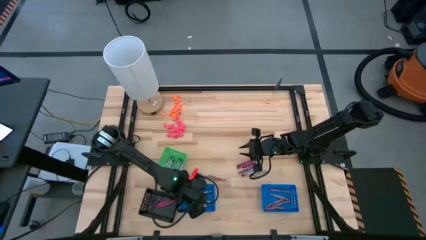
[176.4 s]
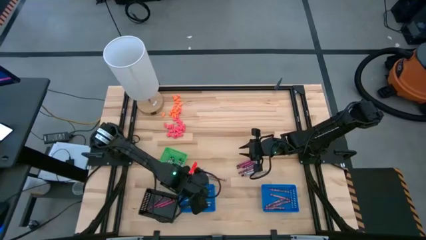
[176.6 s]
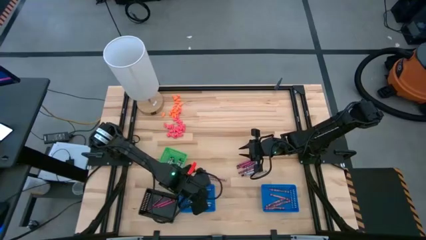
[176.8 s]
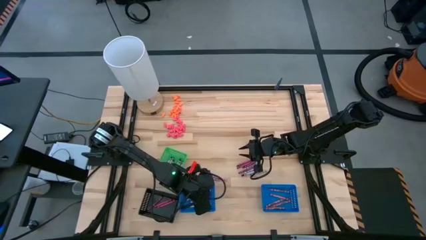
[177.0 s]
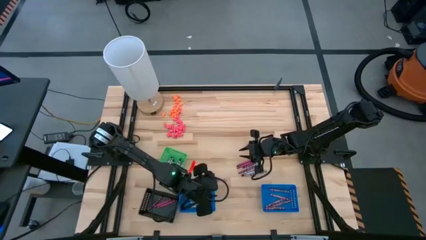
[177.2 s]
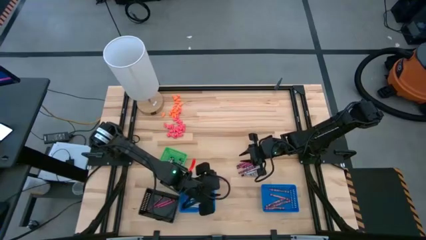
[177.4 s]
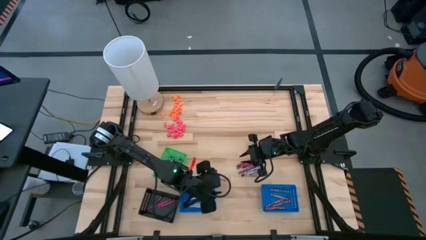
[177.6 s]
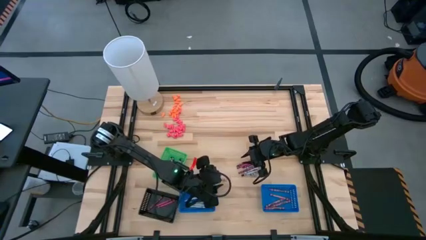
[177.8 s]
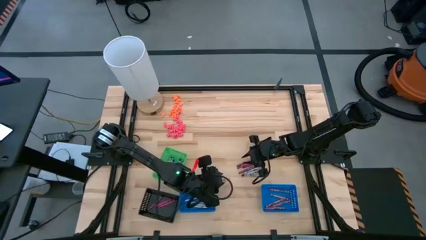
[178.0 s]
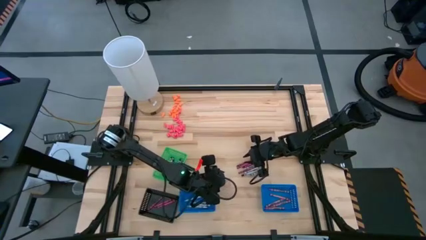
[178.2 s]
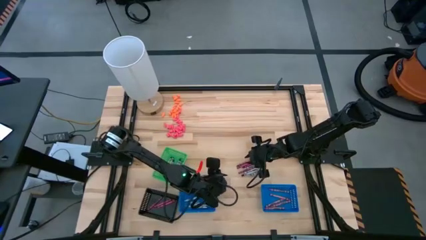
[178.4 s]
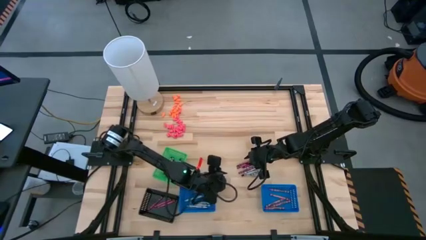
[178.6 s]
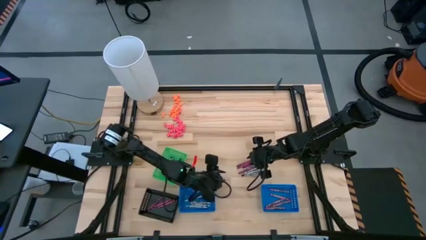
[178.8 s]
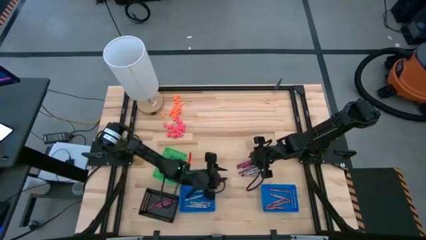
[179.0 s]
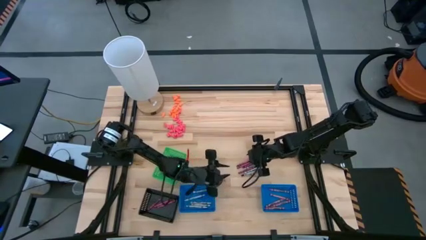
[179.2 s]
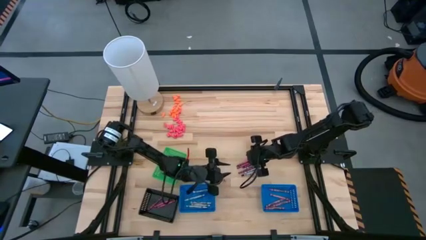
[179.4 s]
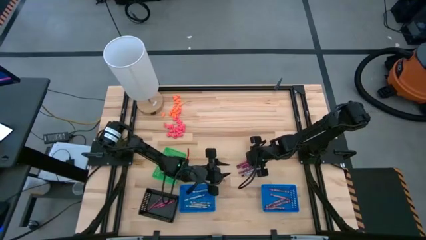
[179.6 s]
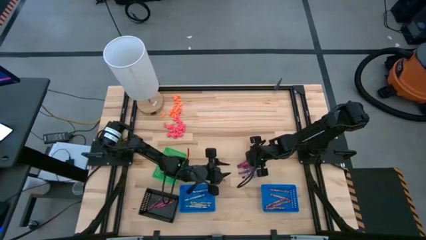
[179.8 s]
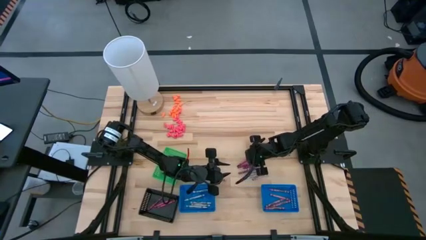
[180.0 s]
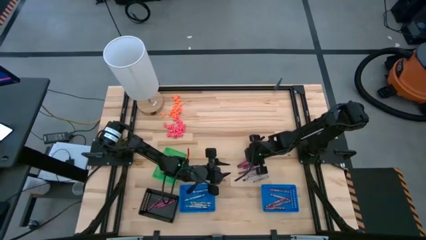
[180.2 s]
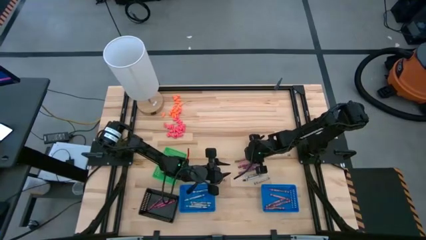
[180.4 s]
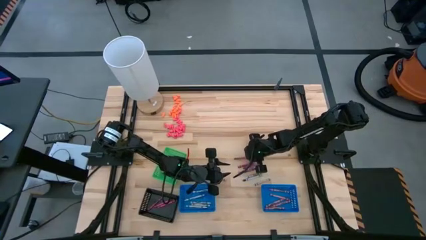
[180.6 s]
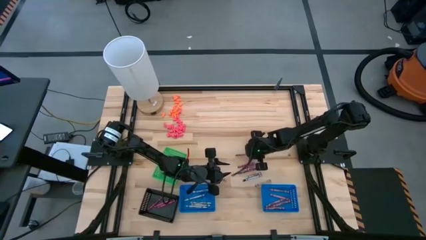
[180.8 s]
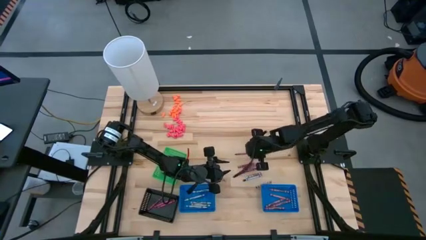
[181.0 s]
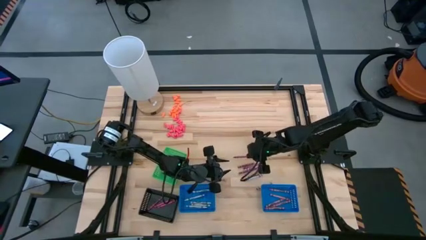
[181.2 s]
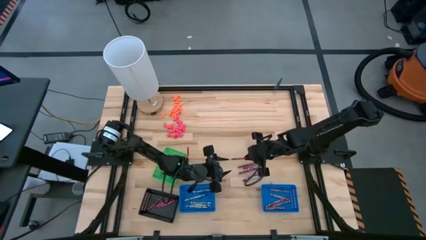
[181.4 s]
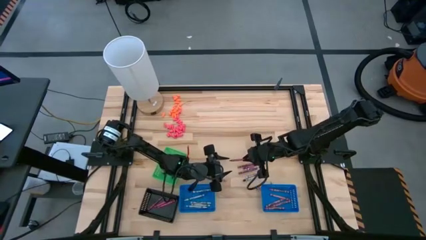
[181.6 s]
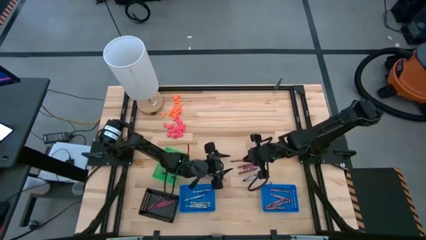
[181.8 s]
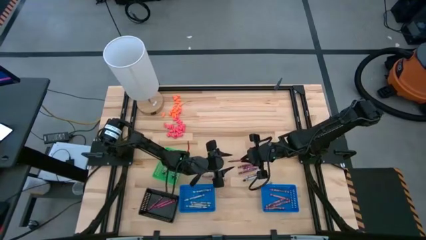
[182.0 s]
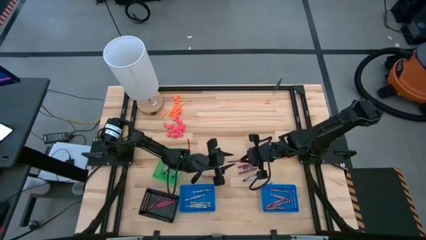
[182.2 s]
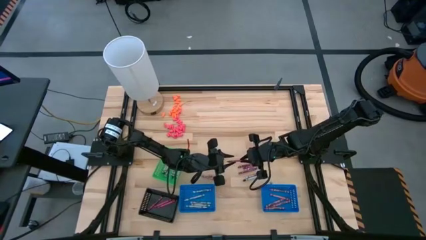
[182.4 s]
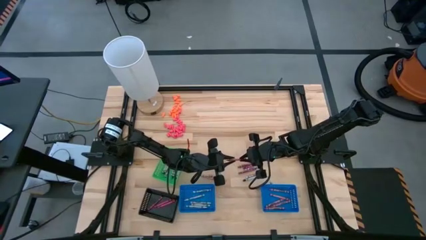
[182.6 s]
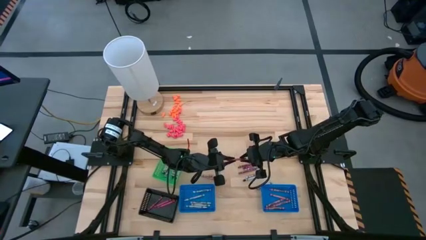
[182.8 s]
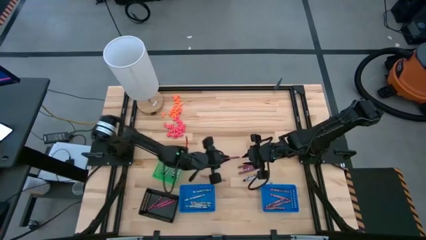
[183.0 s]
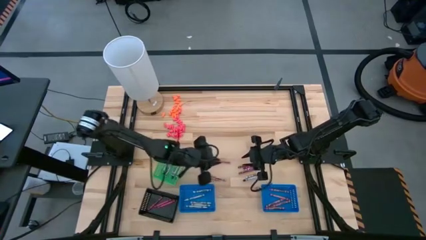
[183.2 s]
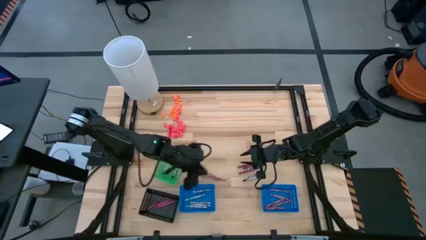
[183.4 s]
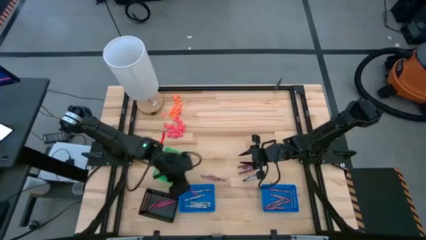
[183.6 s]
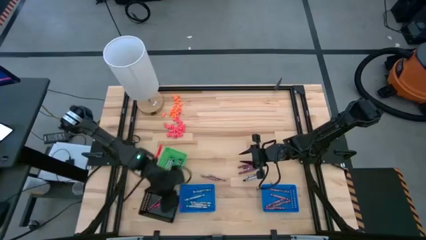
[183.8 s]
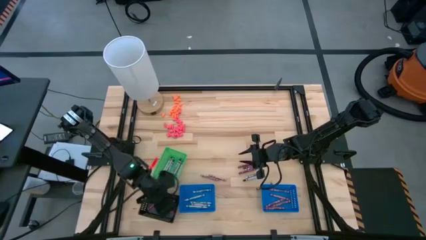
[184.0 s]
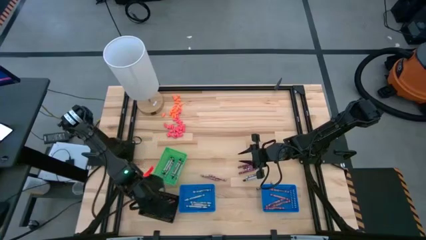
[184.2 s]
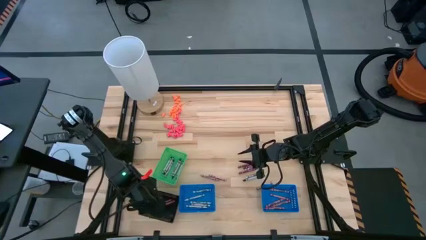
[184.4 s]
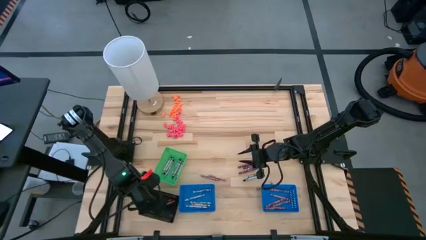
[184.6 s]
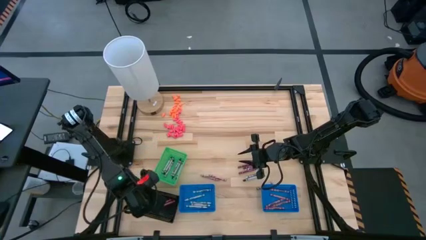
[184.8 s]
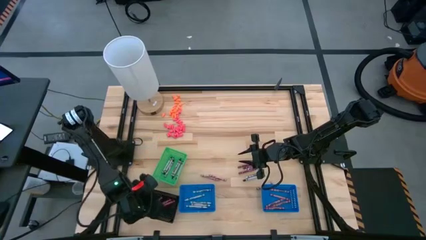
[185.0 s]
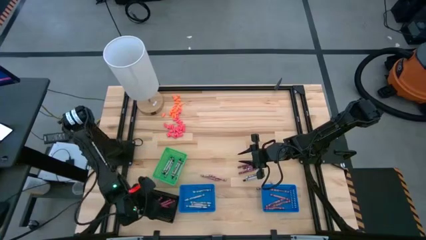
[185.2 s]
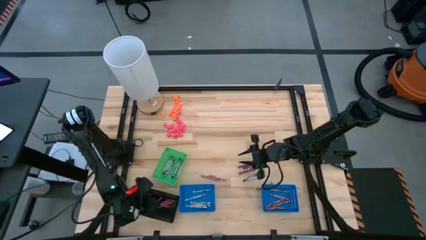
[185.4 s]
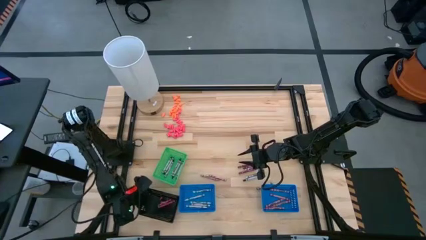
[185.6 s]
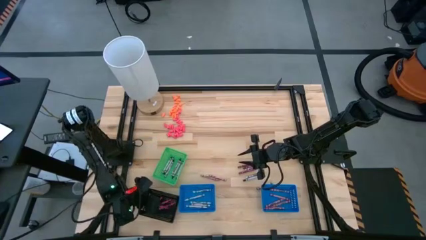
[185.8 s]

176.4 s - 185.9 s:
Task: Sort crayons
Put the red crayon into the black basket

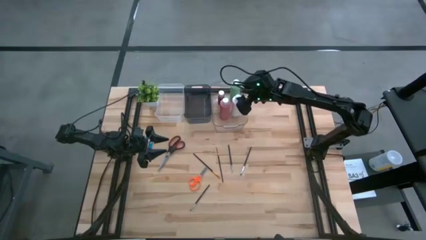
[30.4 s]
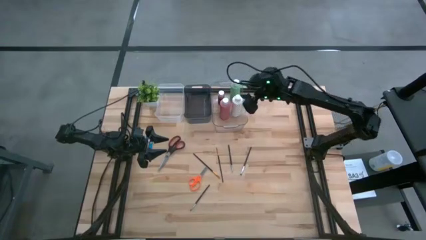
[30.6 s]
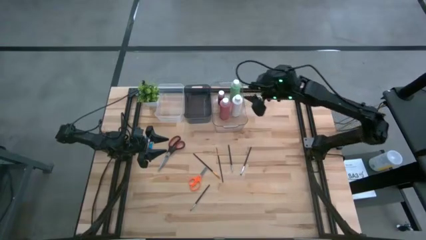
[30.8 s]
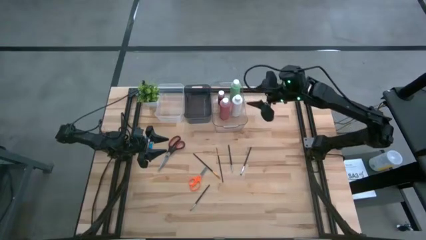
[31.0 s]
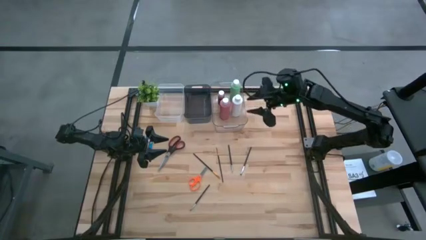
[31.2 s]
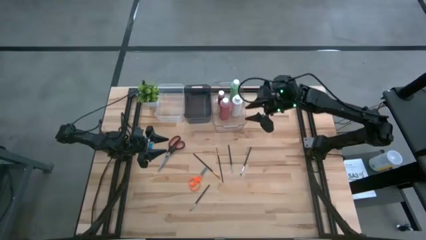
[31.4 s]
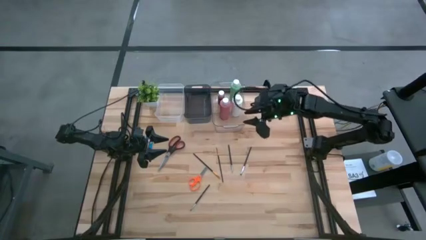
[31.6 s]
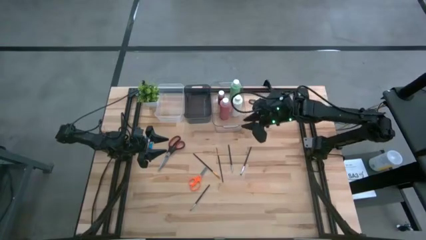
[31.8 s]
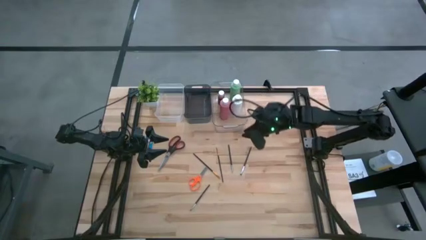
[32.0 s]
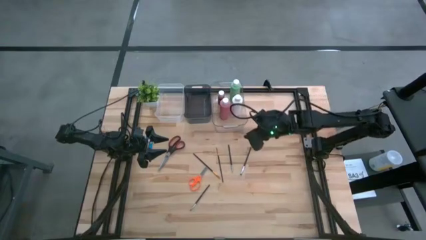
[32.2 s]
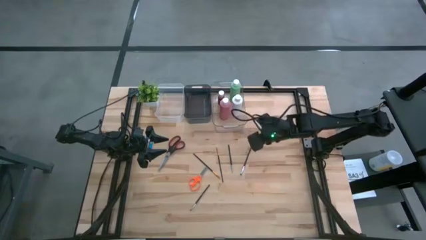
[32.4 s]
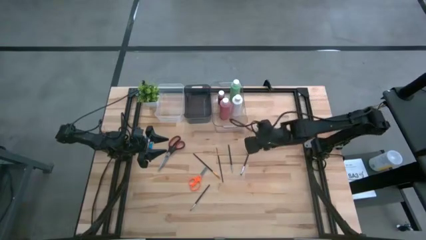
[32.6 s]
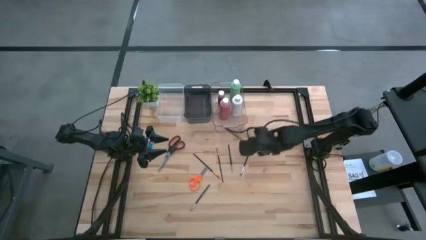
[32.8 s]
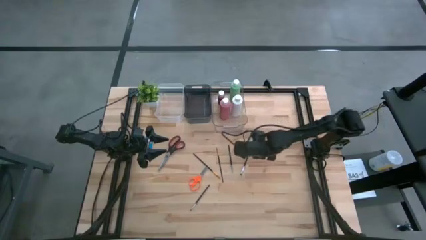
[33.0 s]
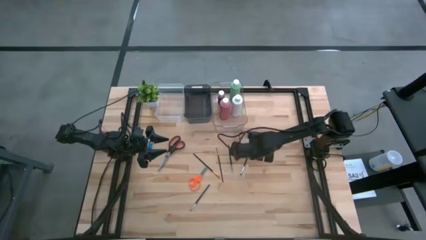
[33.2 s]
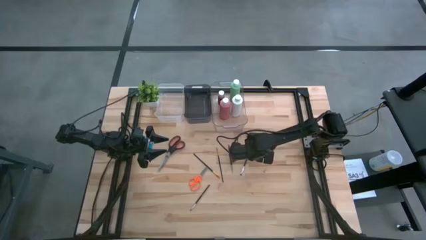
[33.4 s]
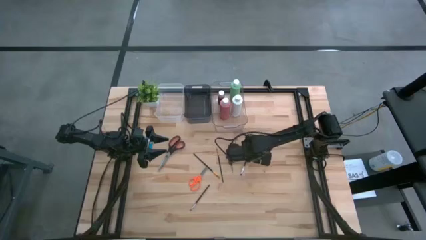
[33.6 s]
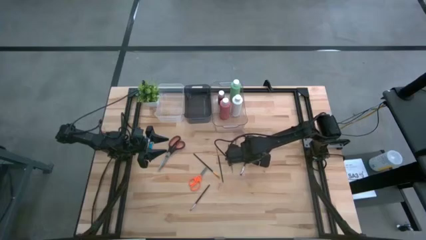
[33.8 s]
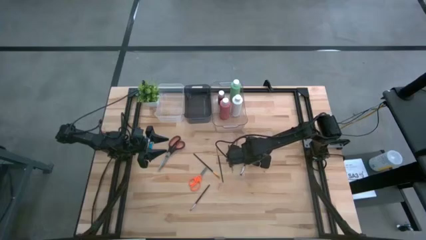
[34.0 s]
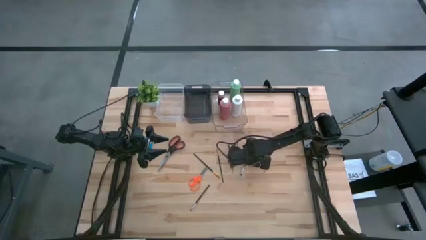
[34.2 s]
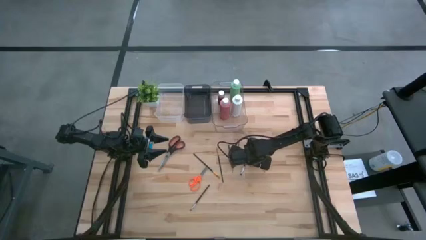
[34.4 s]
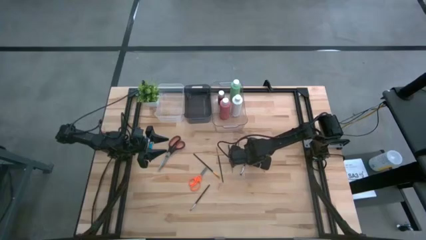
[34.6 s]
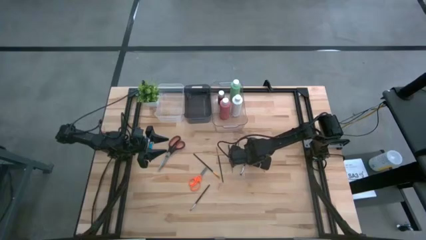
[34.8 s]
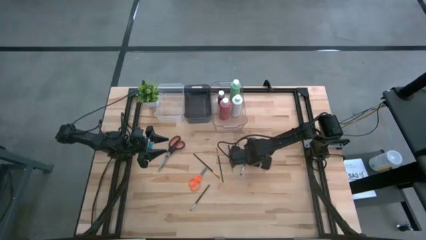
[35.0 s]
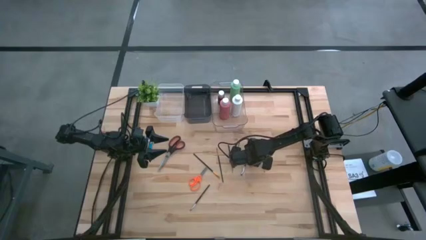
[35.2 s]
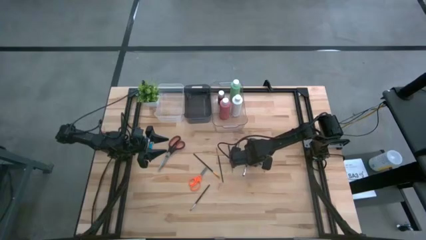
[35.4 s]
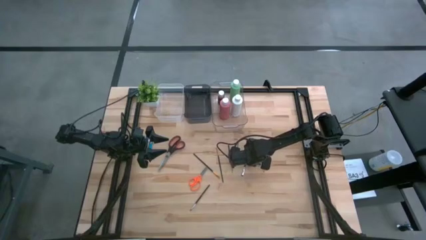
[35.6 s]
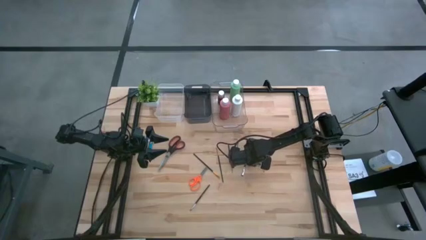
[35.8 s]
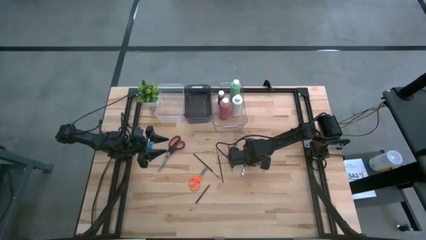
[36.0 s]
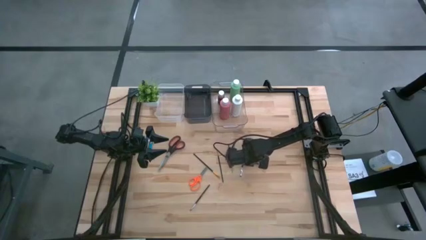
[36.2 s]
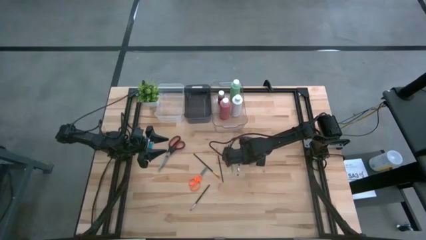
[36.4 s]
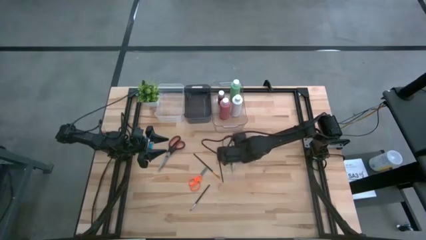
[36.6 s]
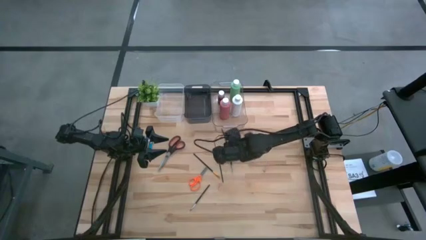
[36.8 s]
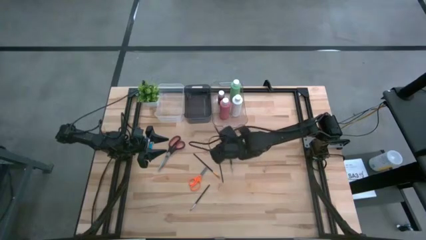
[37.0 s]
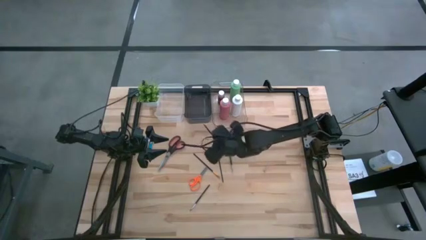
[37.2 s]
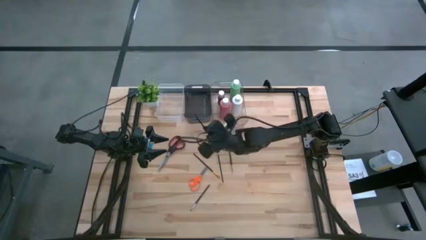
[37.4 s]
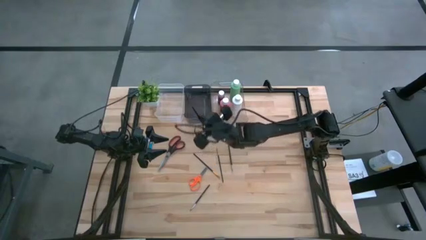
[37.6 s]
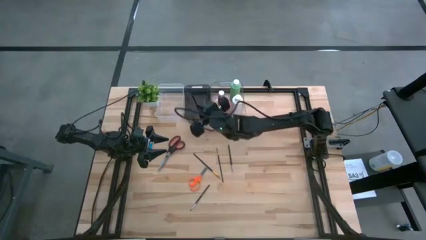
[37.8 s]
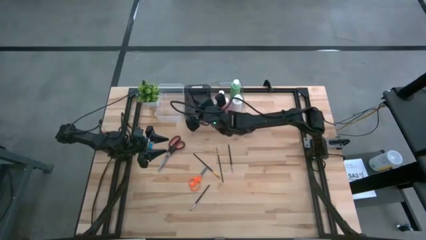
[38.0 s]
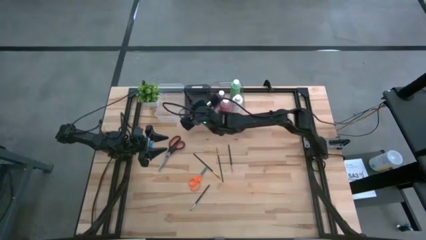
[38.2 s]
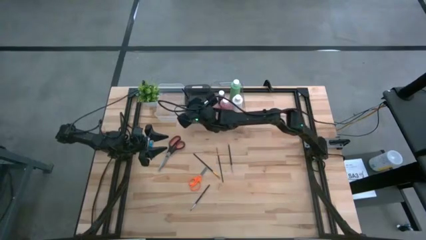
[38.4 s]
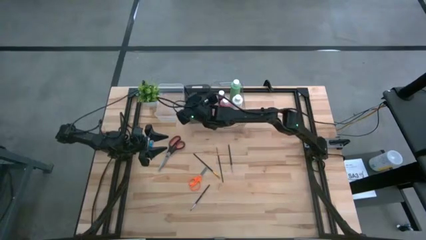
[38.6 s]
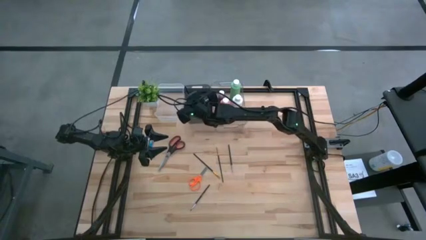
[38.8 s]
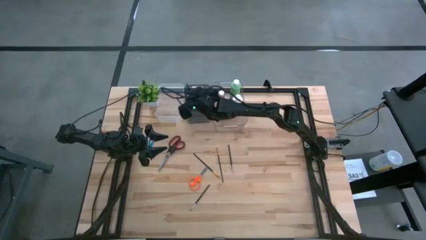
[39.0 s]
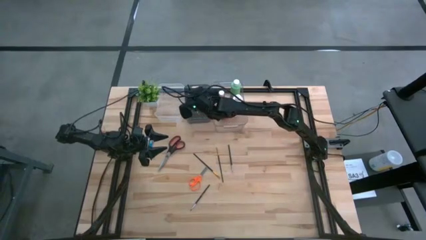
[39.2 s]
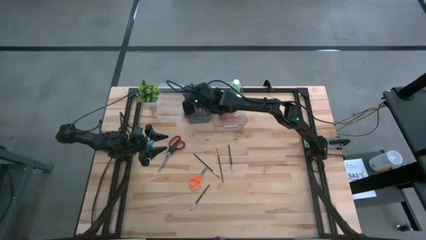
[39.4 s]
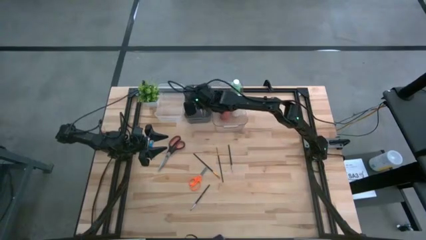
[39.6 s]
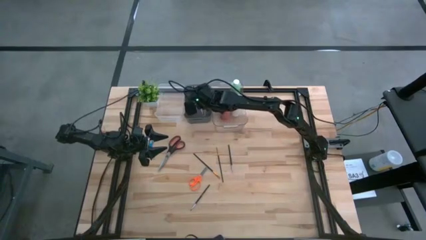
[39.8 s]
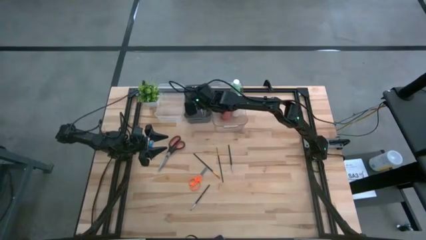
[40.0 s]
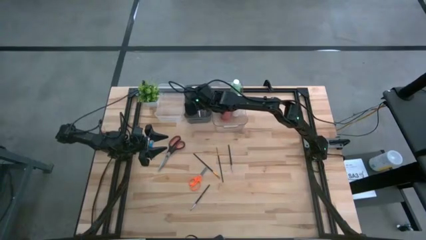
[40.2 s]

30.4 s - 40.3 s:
Task: Pick & Place Paint Supplies
Put the top right silver paintbrush into the black bin
